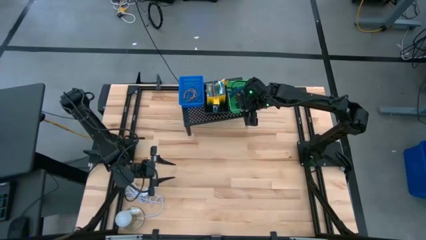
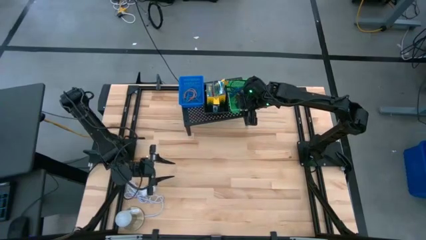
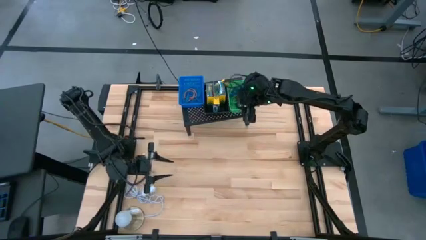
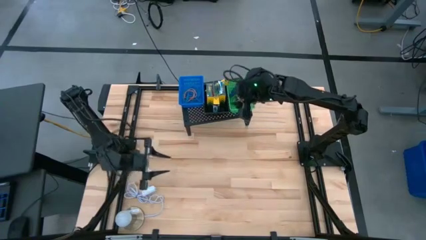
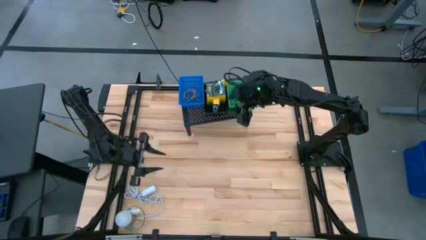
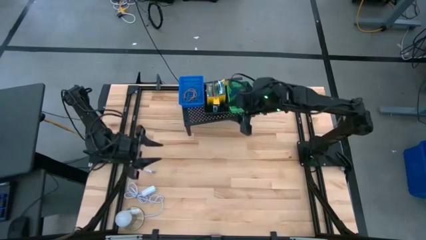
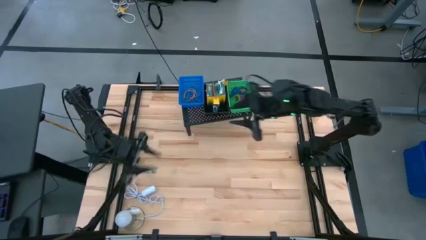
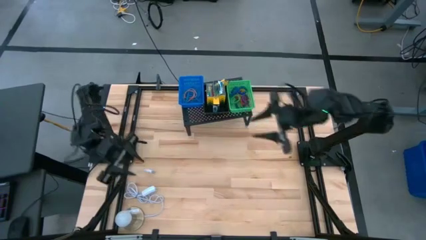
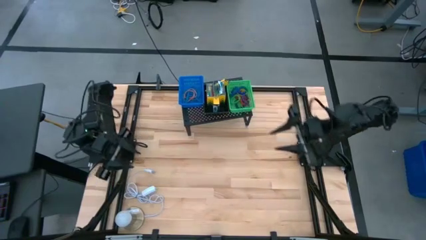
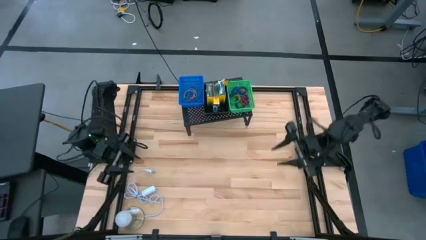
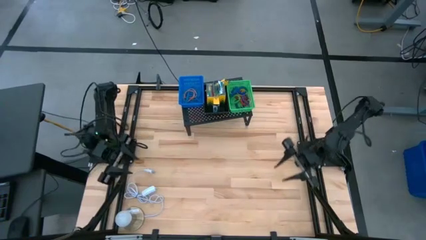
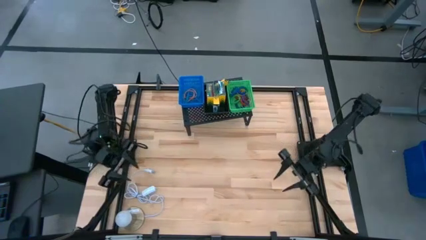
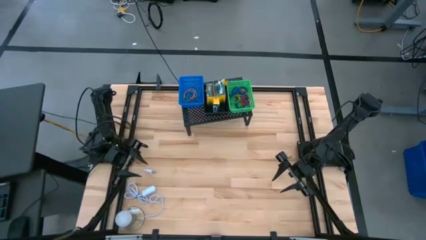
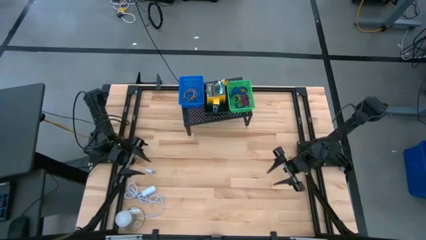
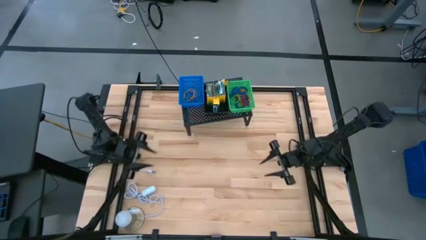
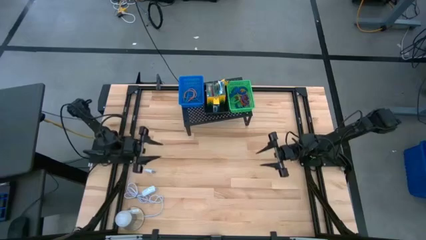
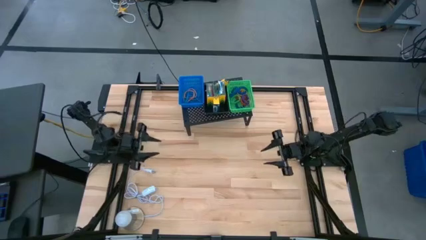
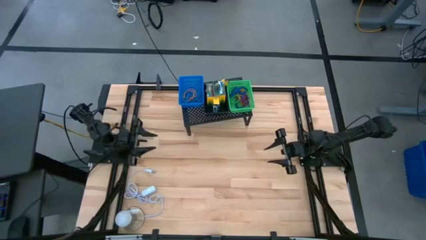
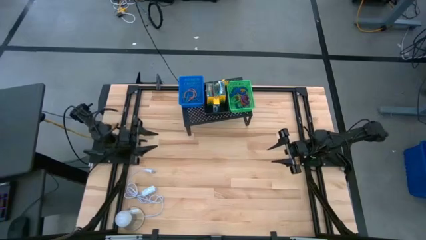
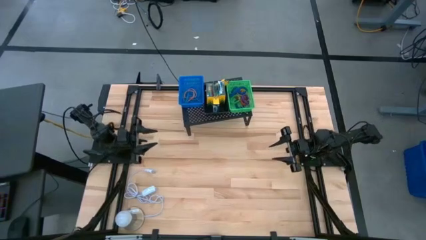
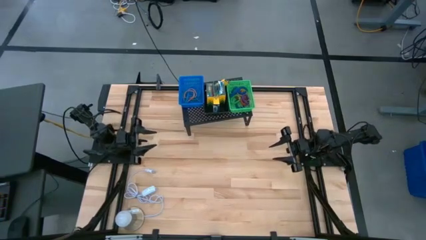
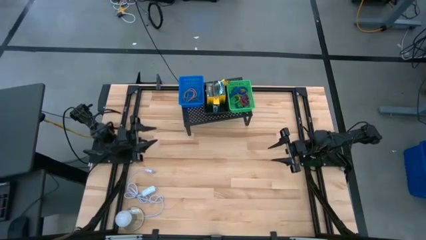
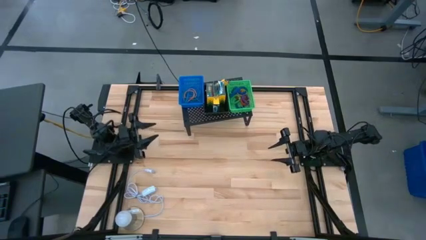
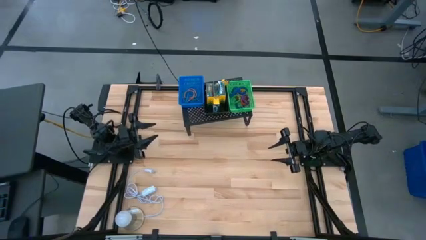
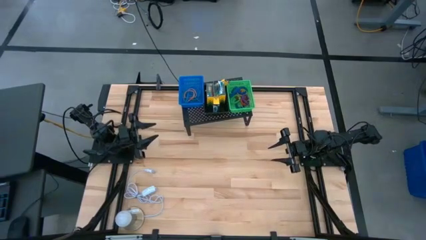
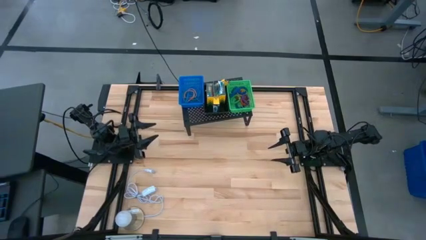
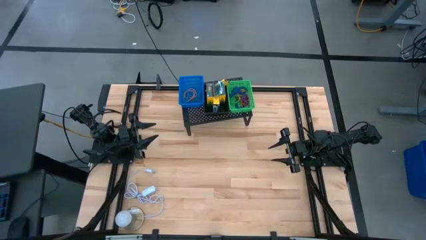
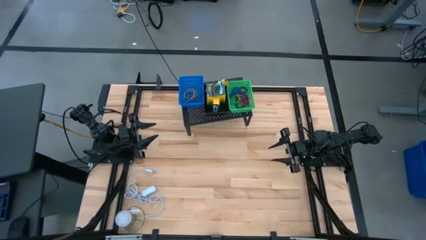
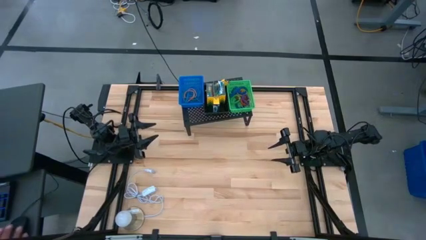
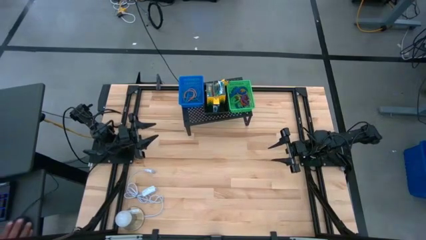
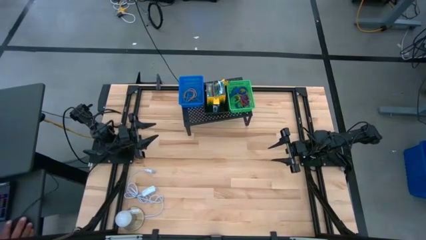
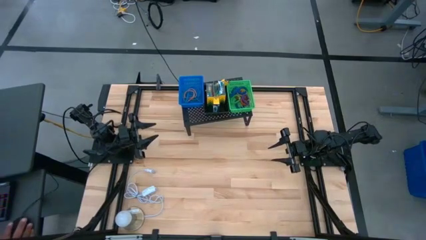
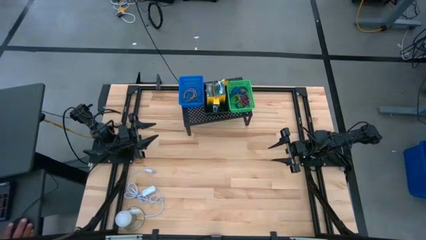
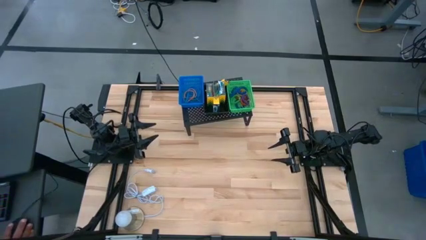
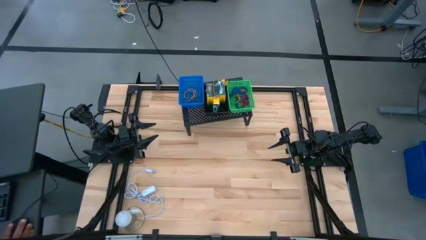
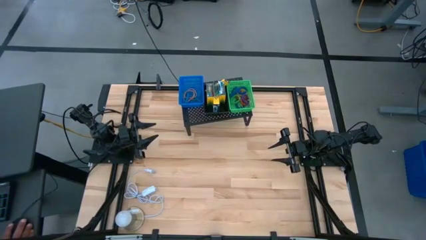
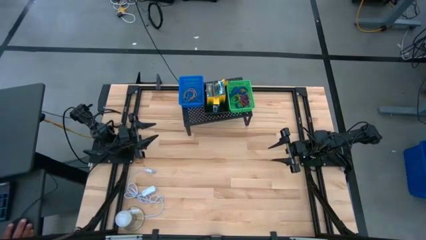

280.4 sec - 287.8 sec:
Task: Pick & Place Office Desk Supplies
Return to Home Position

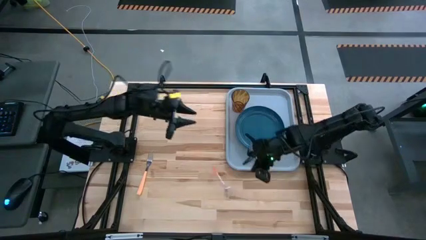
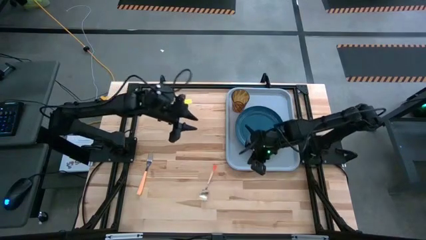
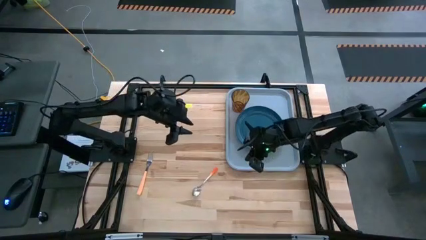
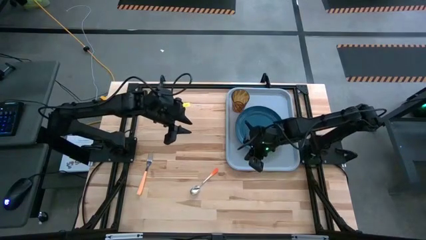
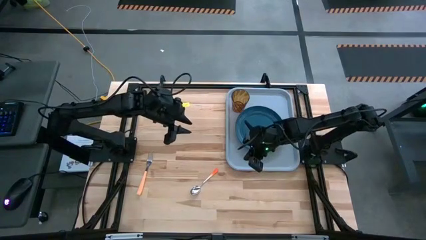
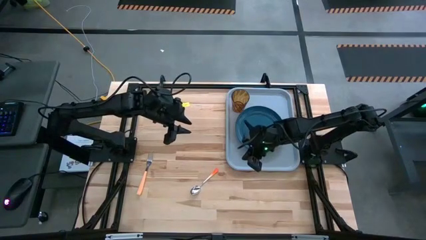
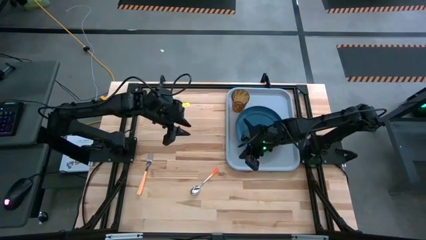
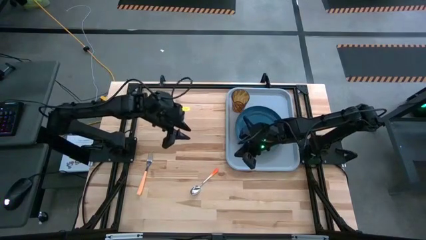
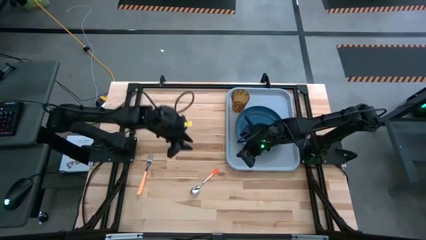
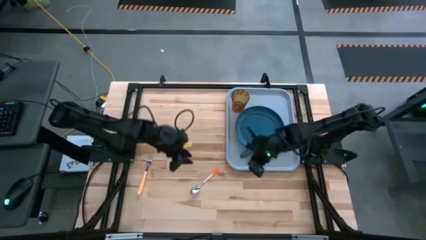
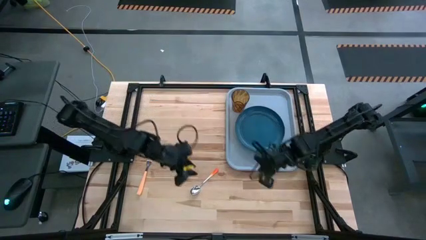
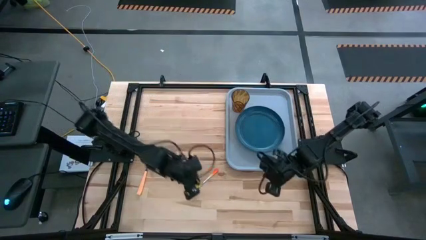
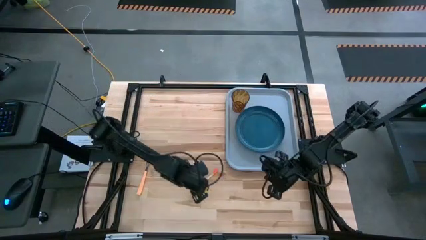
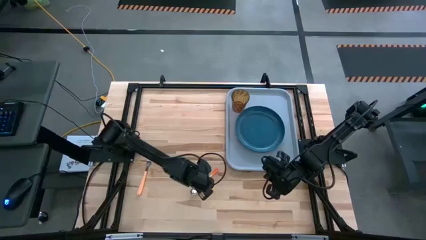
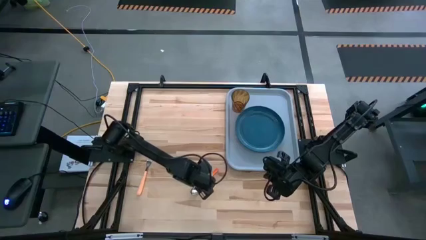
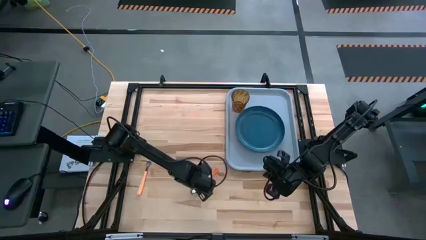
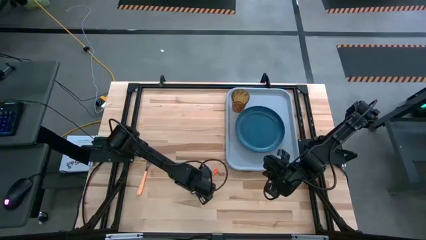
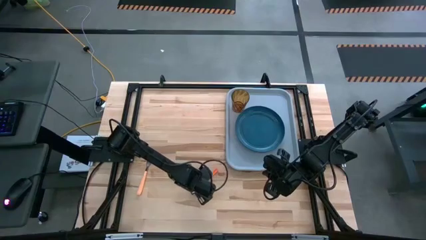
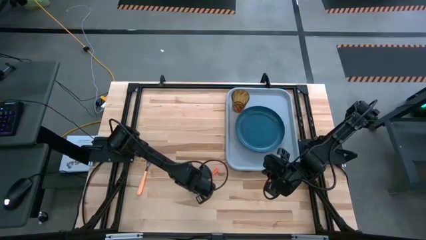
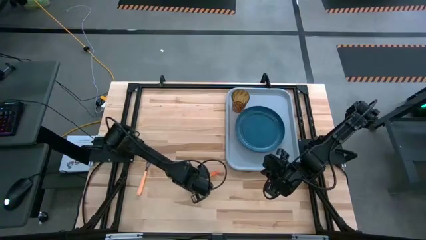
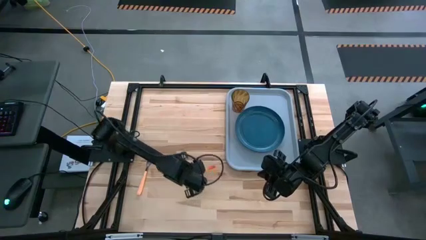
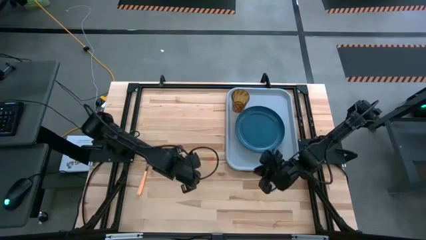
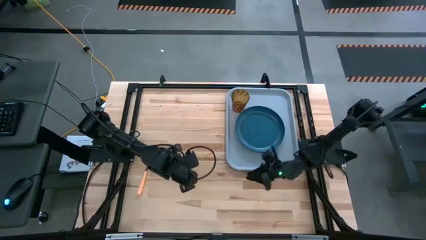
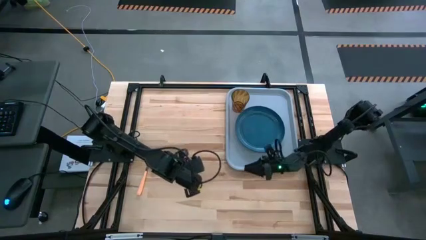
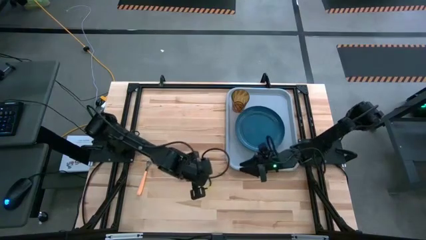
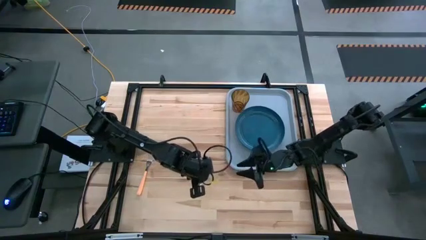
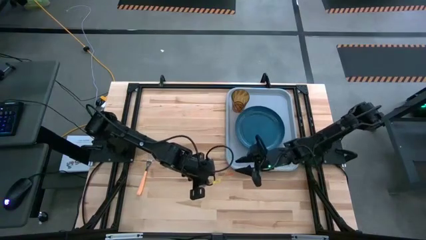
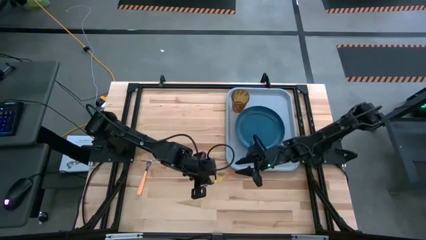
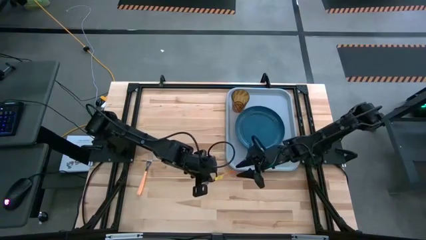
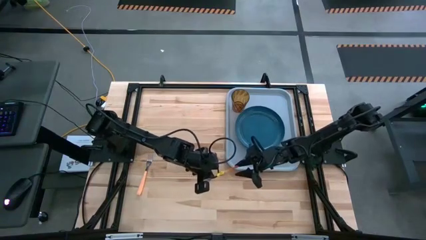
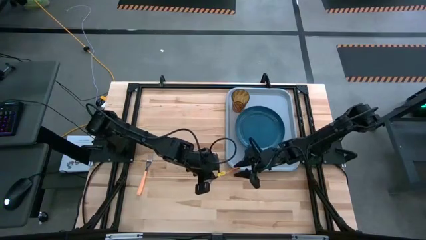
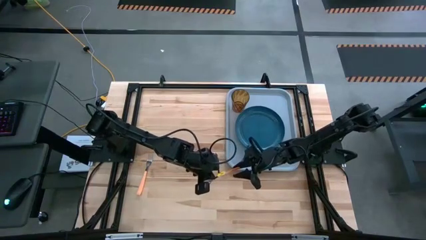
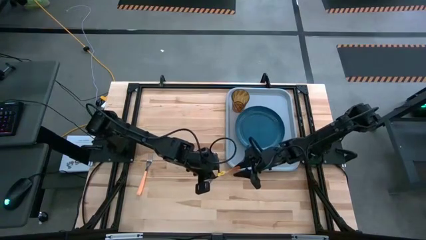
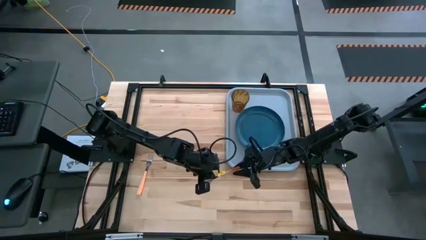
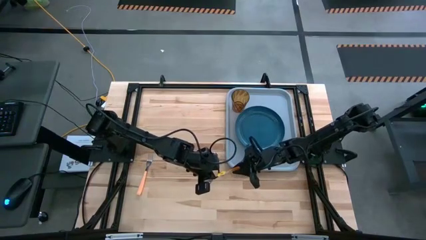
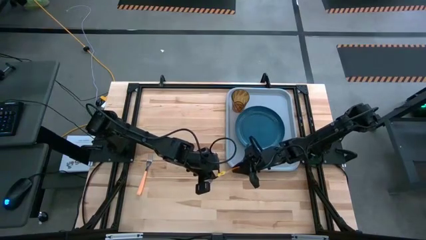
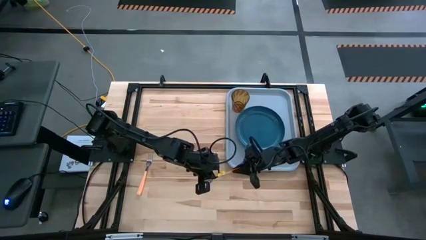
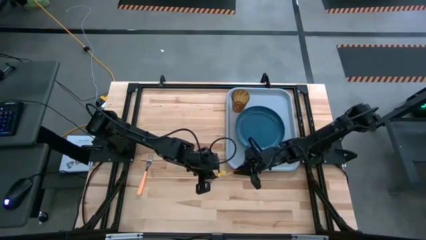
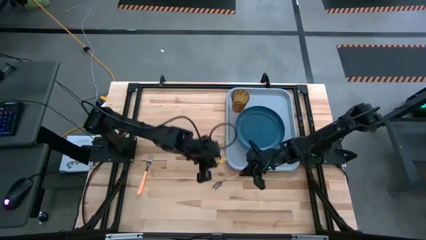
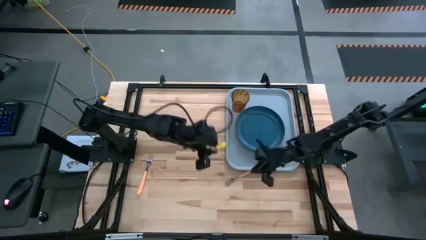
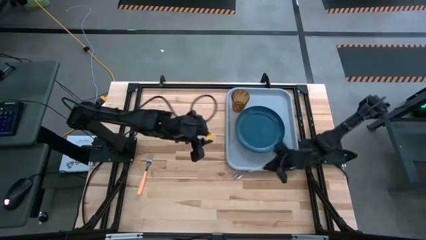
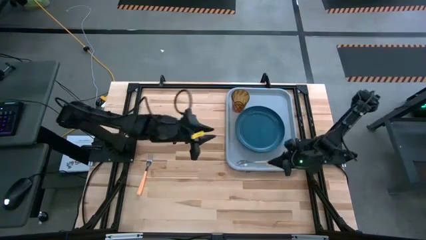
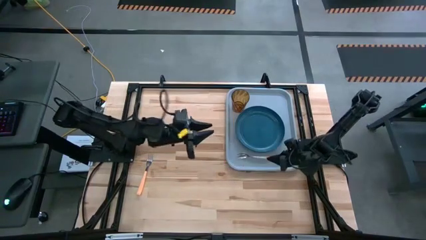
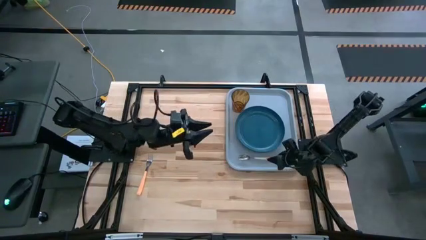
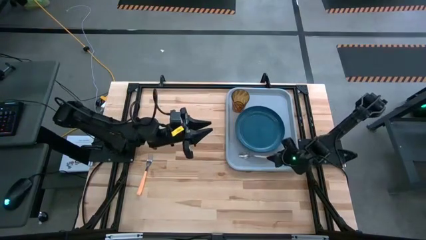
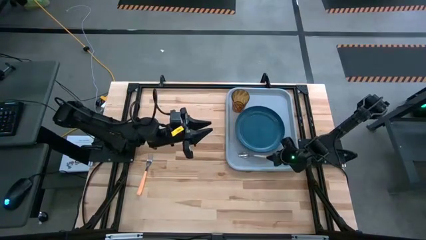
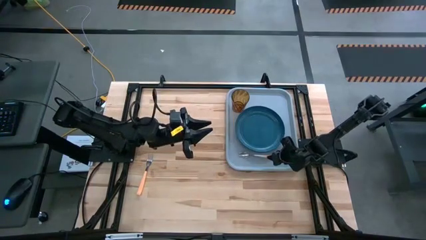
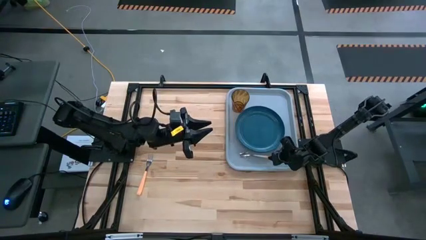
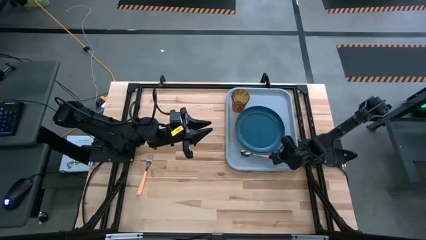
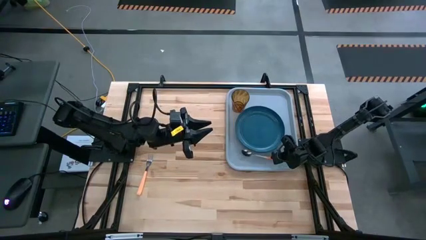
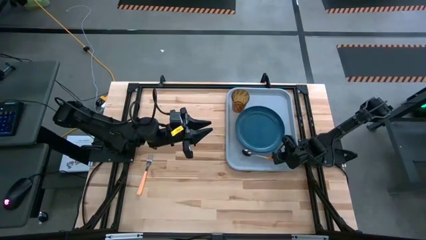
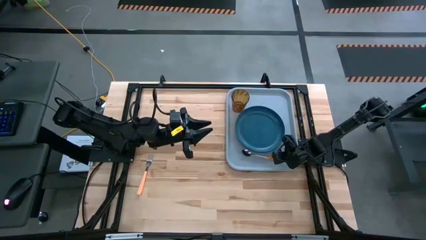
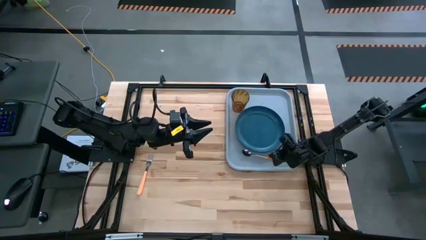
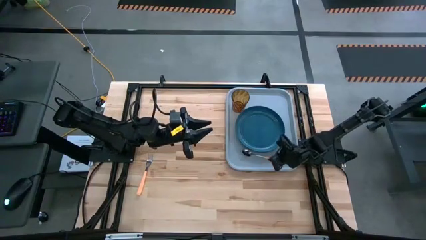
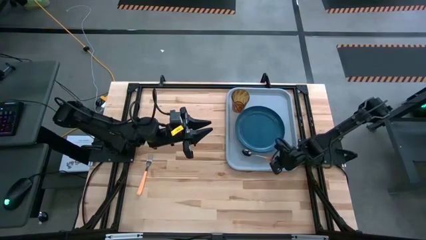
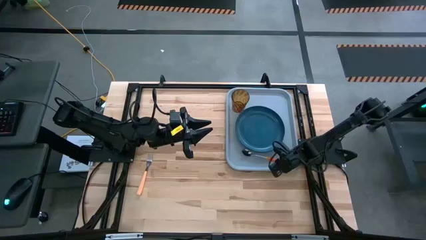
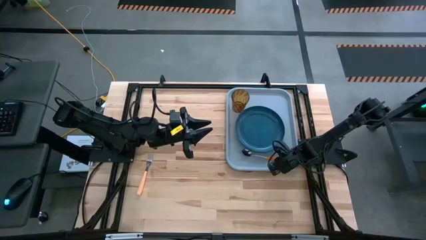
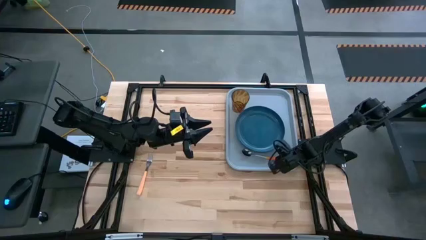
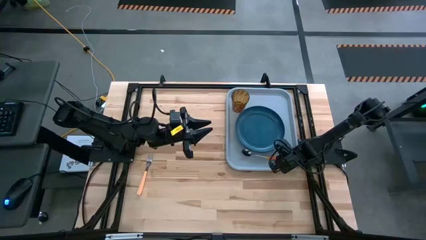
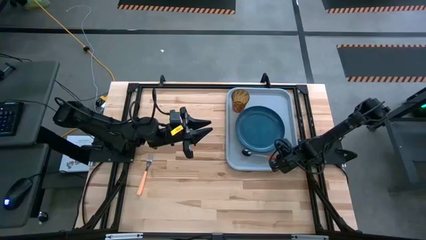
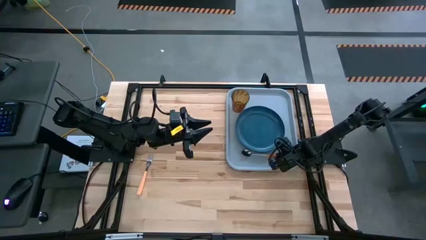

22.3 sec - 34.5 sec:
Task: Pick and place plate/cup/fork/spoon on tray
Put the orange spoon on the gray tray to the bottom of the blue plate
